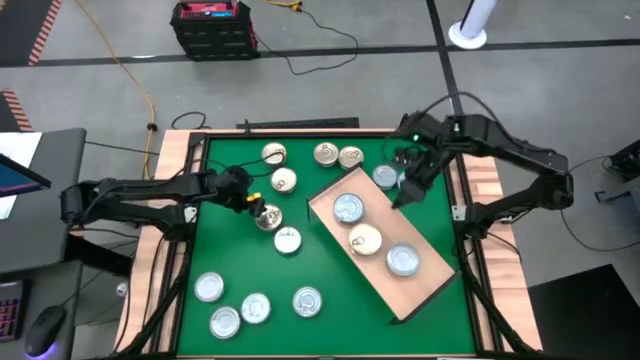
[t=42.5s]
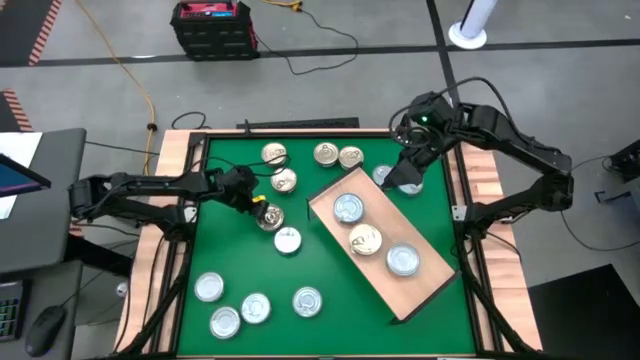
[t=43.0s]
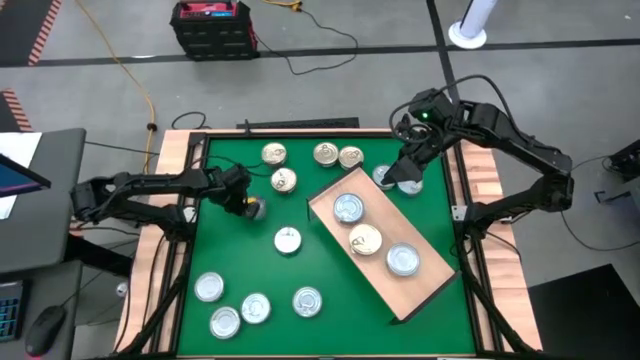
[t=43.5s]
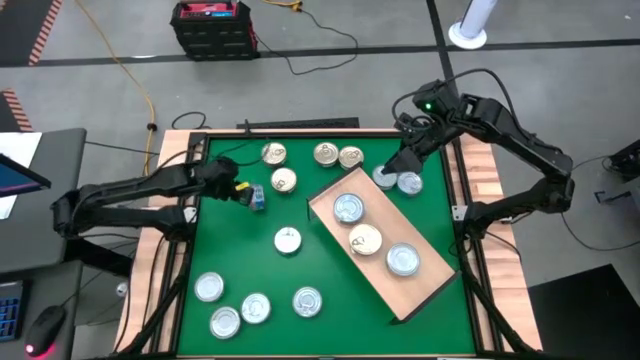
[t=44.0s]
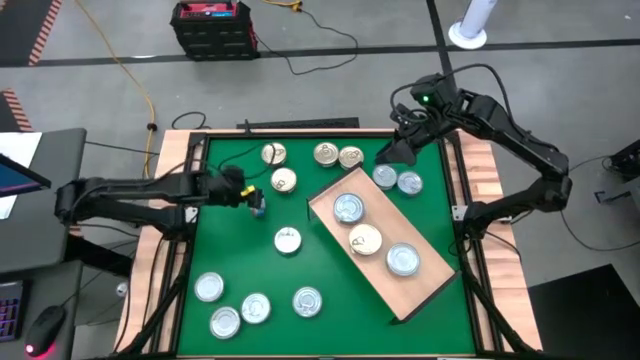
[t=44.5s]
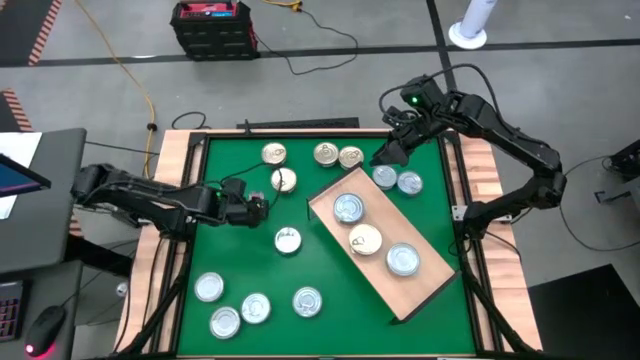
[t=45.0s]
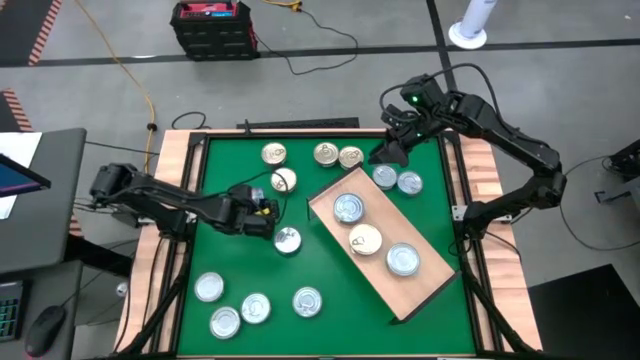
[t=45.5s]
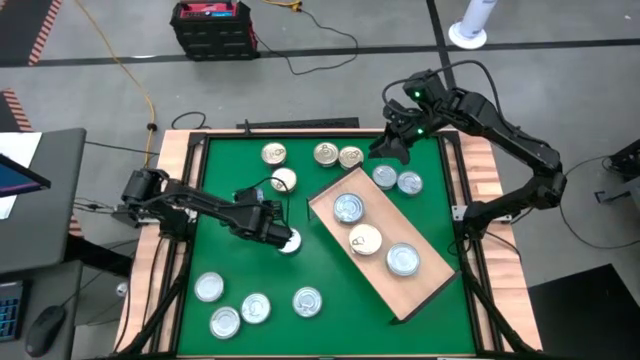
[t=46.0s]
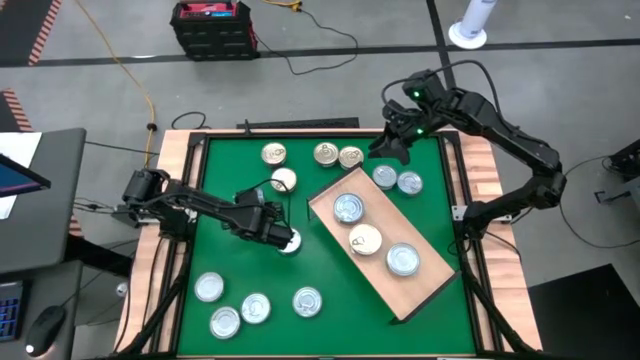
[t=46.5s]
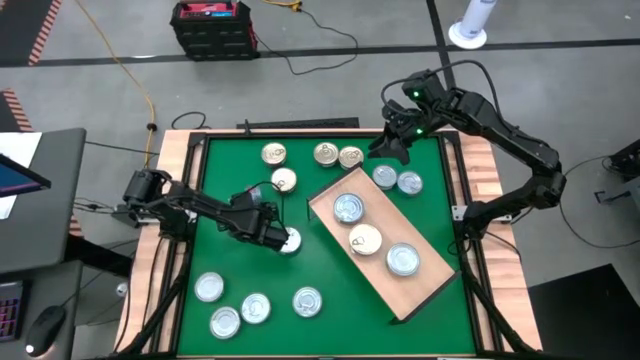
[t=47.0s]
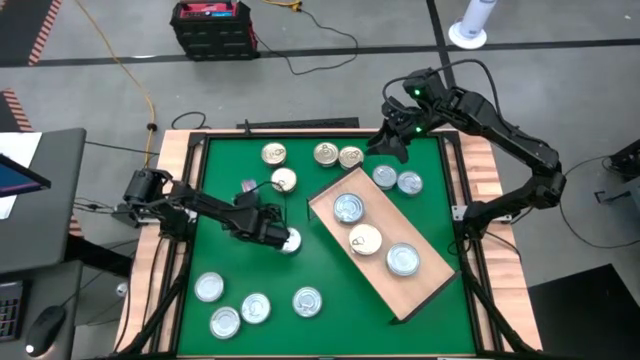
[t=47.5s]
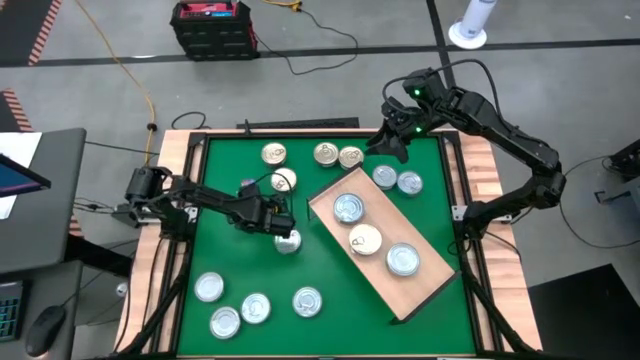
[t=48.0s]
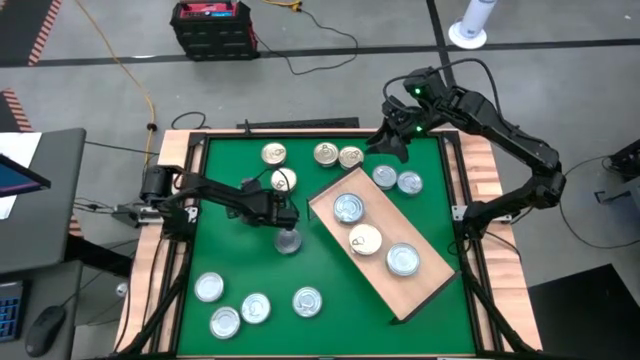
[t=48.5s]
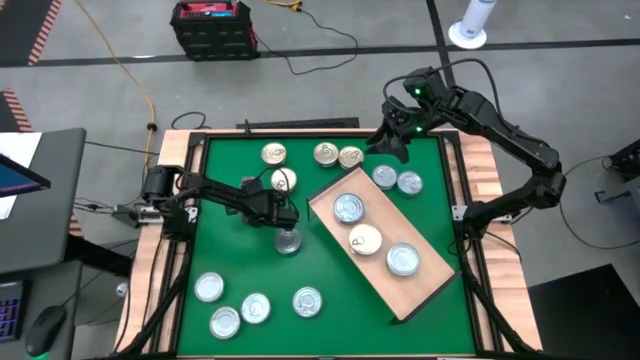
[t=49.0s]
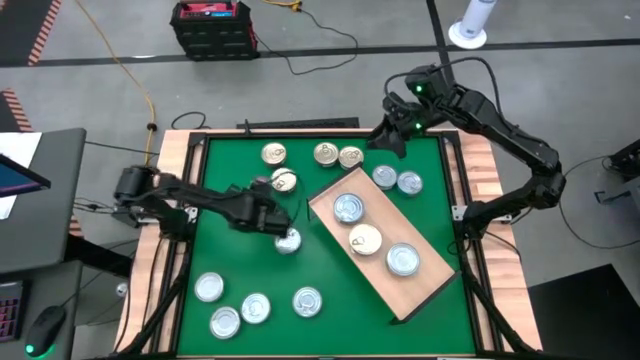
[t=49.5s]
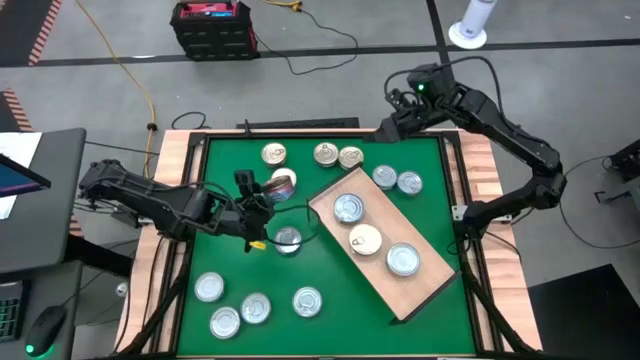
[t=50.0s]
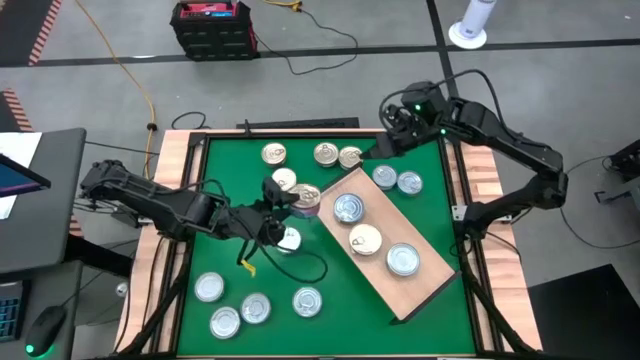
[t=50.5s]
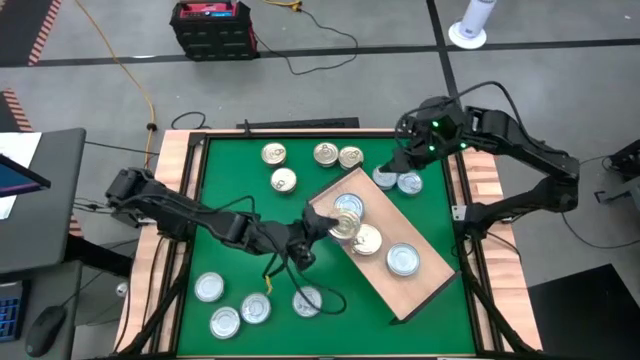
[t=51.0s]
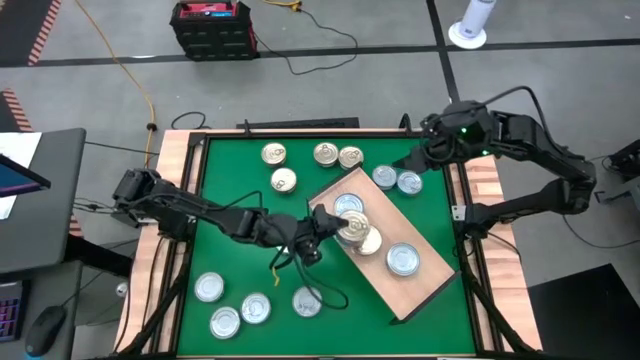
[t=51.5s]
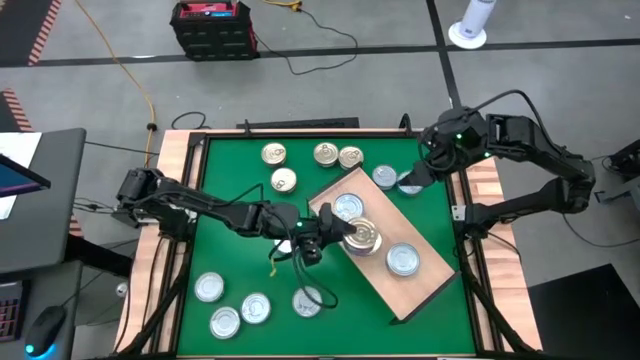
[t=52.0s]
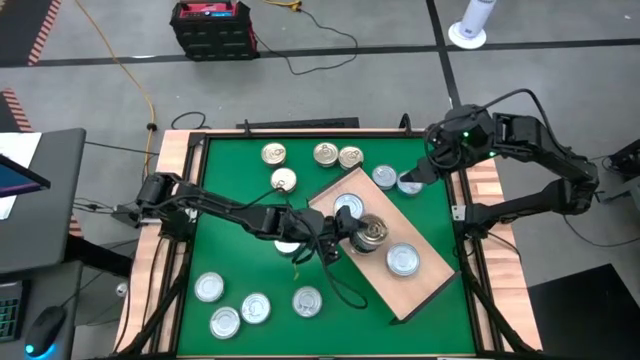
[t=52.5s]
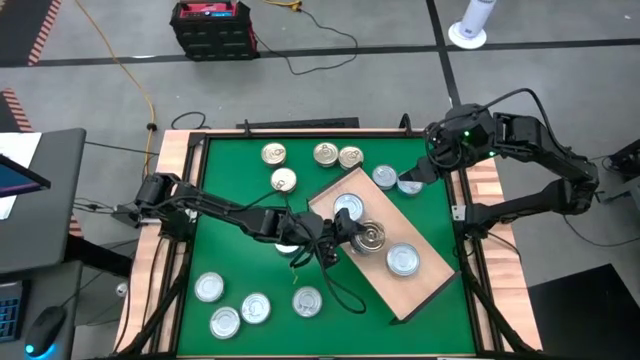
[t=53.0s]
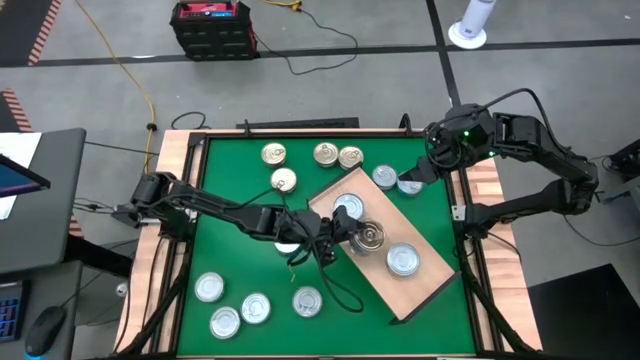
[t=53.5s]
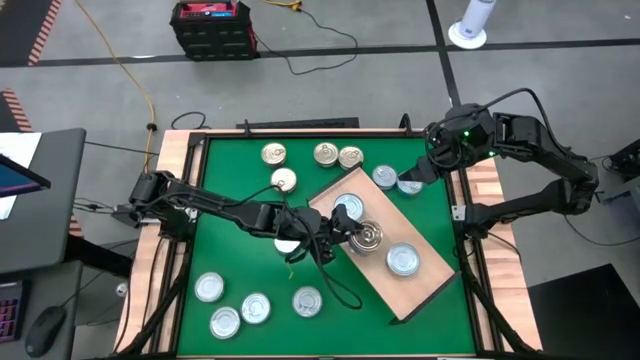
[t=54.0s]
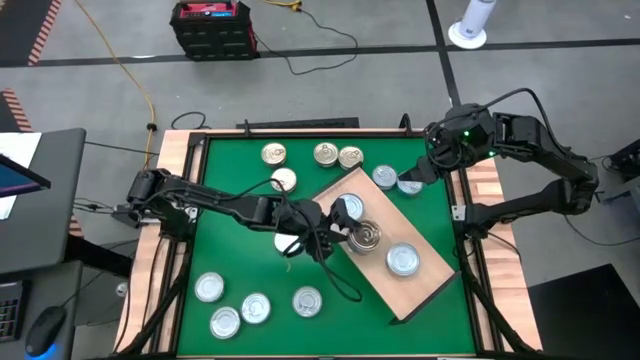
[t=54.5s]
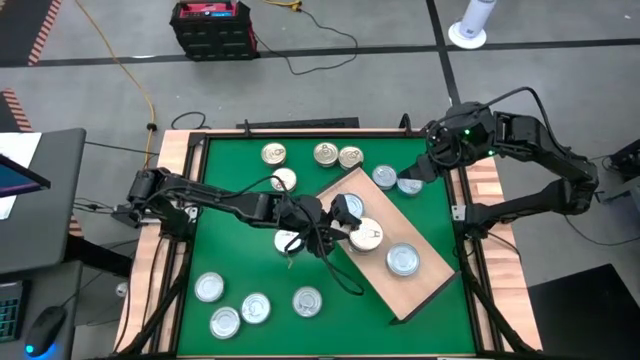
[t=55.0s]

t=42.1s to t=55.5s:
Task: Stack canned seafood by type on shelf
Stack the blue and pink tuna can on top of the other blue and pink tuna can on the shelf

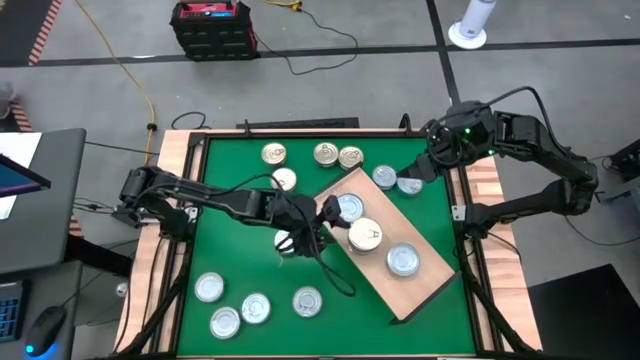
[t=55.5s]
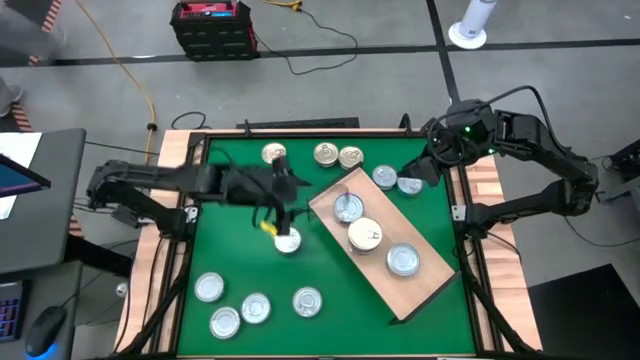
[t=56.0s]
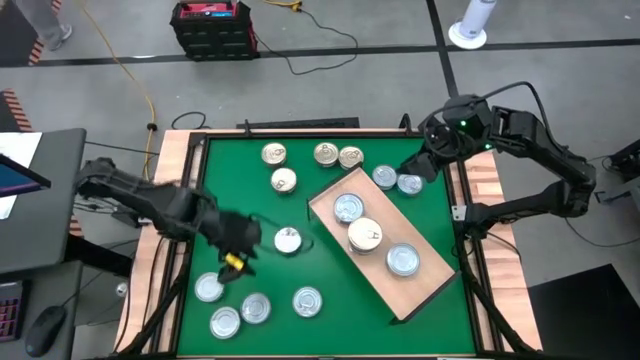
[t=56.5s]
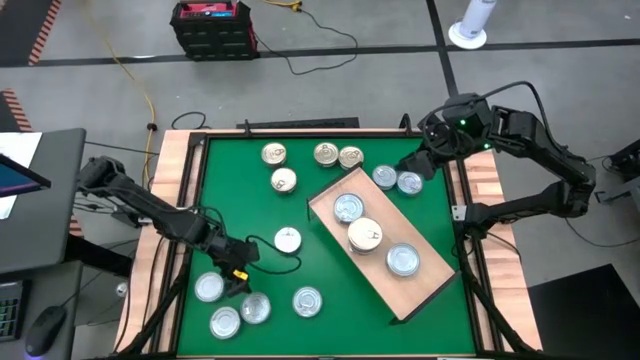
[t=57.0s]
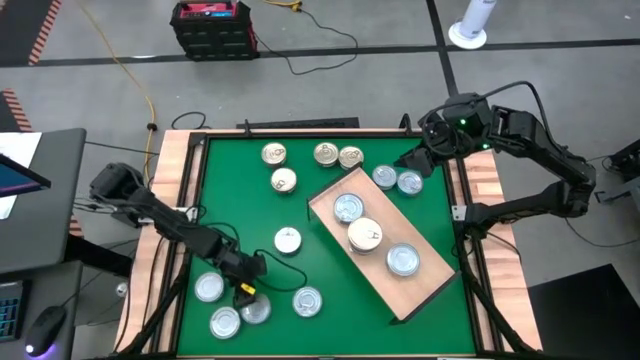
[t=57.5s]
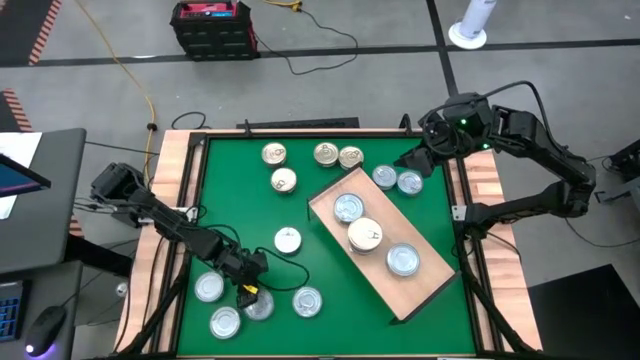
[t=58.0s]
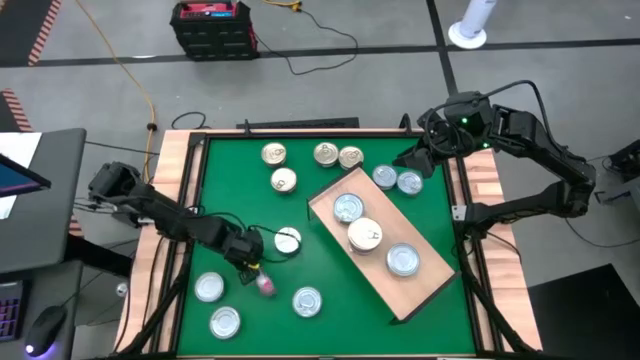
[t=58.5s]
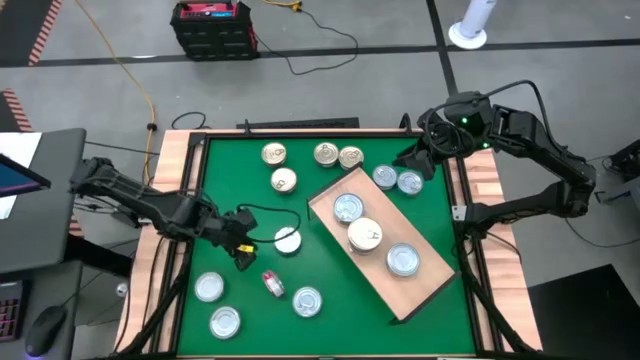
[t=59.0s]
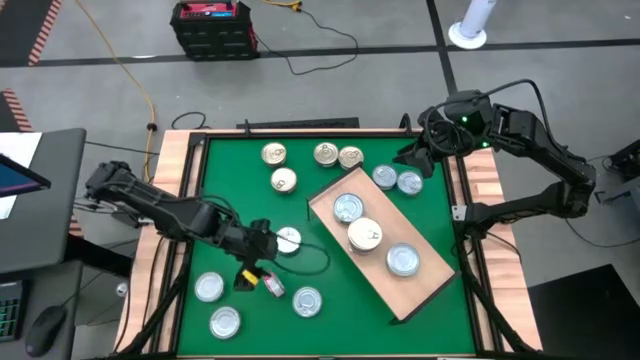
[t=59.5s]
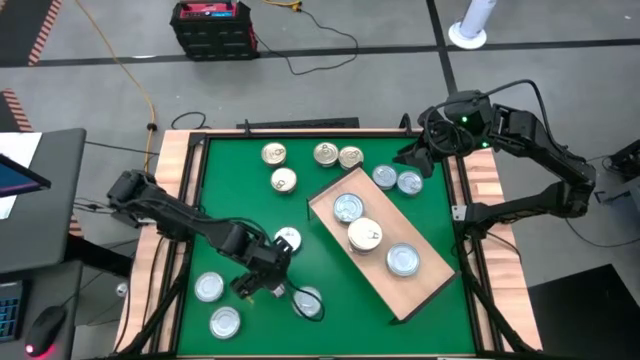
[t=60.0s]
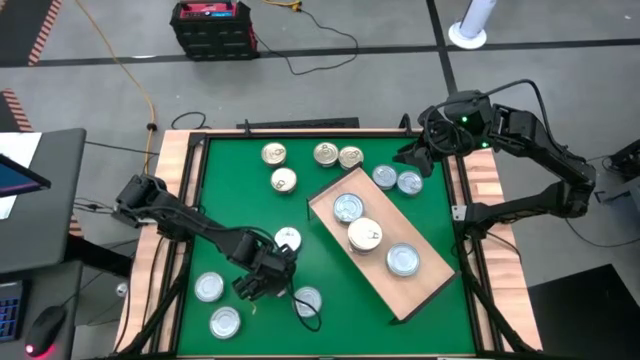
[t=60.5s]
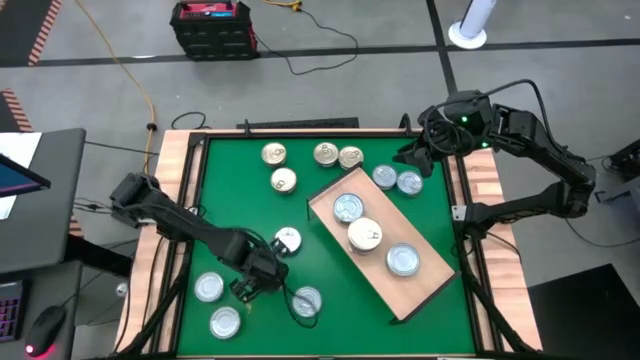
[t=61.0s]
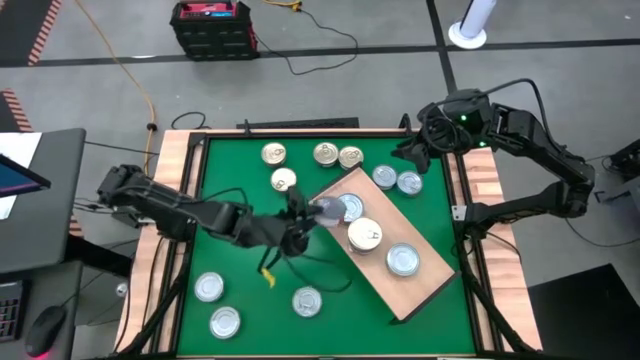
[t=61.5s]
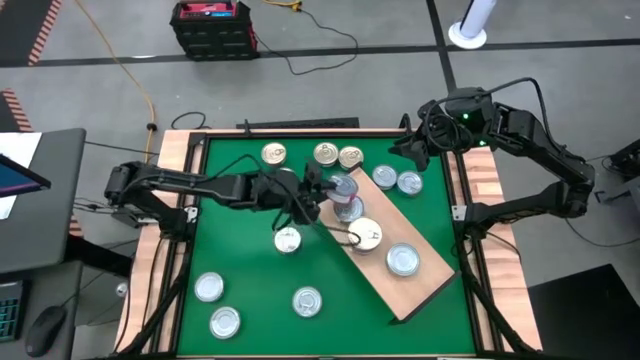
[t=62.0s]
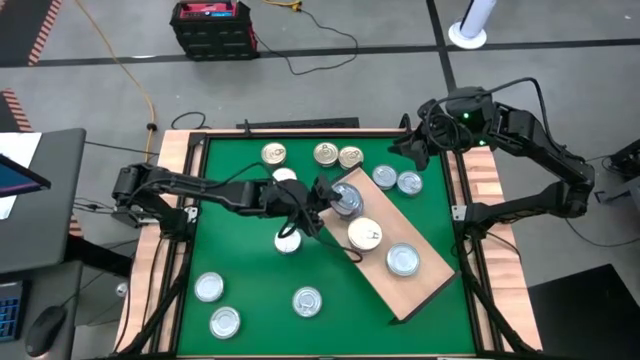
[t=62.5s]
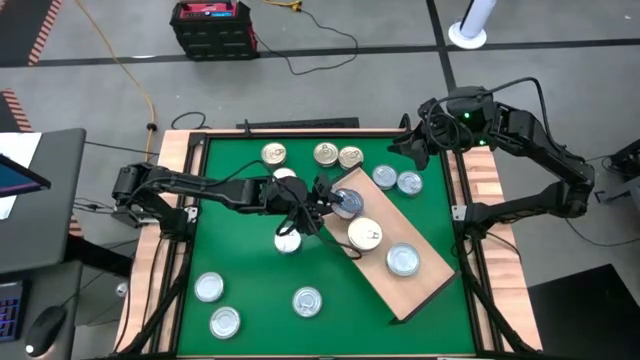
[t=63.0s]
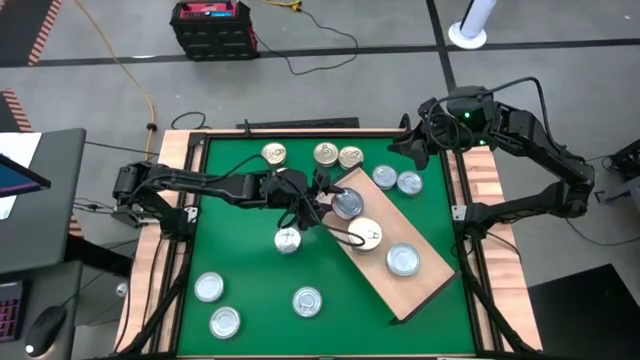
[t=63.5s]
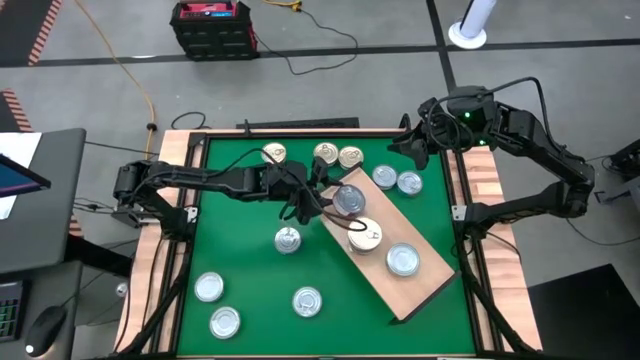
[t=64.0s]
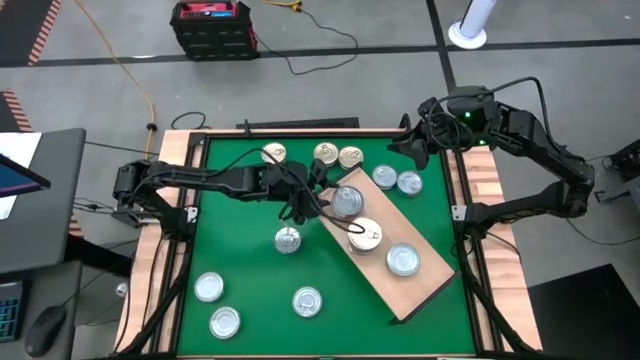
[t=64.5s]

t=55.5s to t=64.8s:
Stack the red tuna can on top of the green tuna can on the shelf
